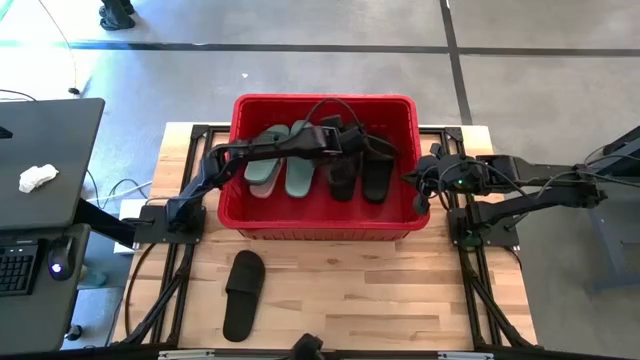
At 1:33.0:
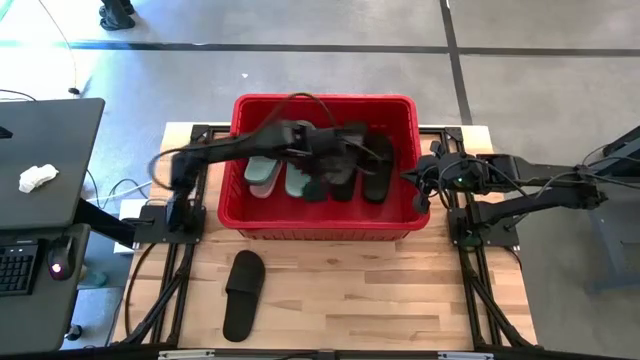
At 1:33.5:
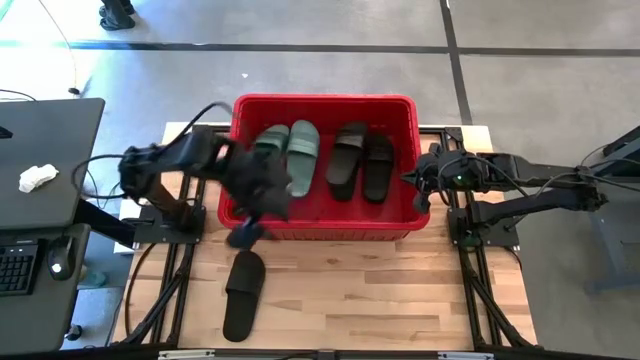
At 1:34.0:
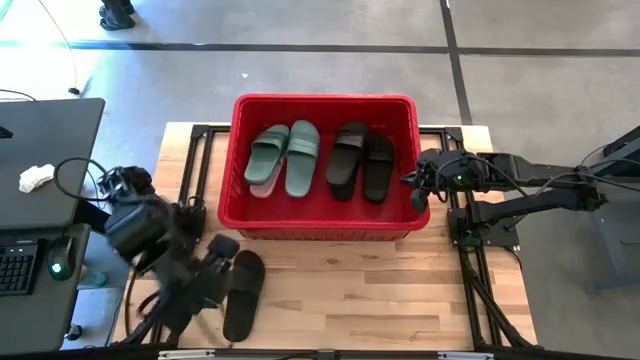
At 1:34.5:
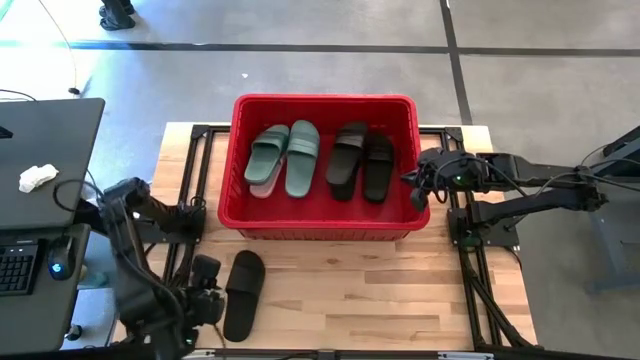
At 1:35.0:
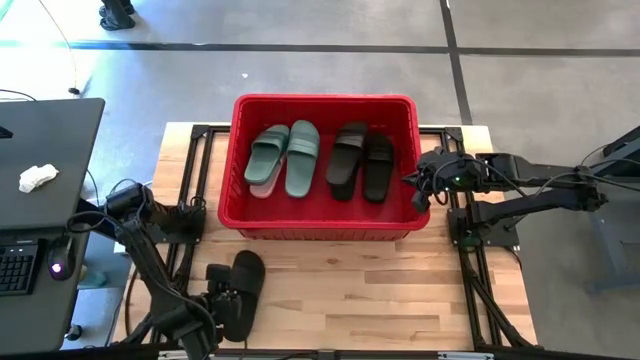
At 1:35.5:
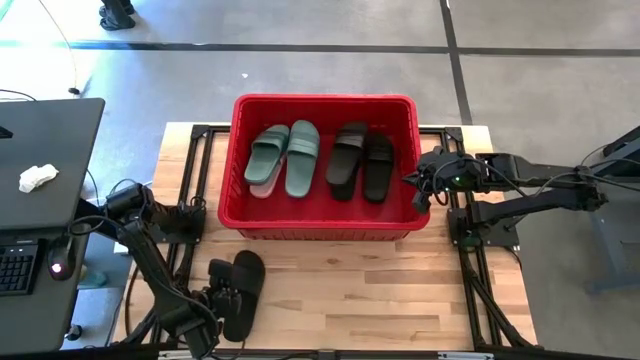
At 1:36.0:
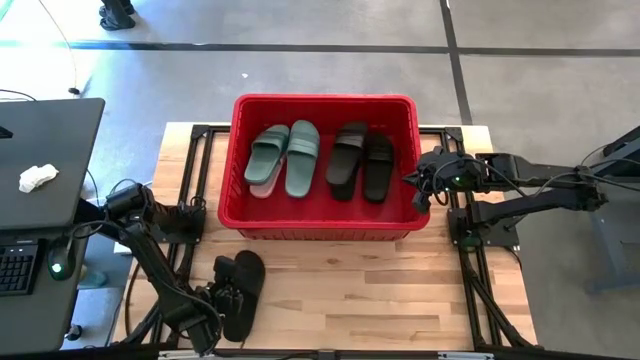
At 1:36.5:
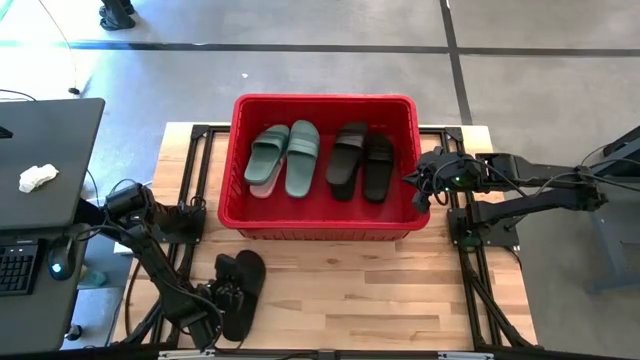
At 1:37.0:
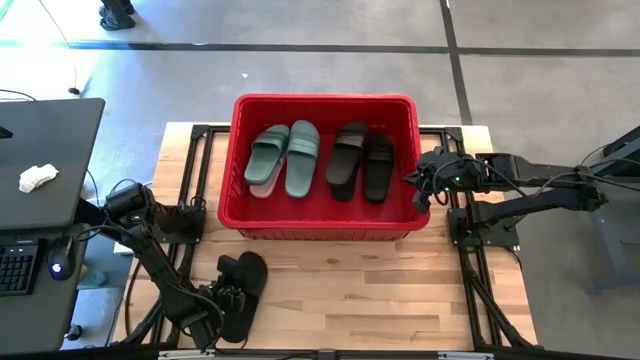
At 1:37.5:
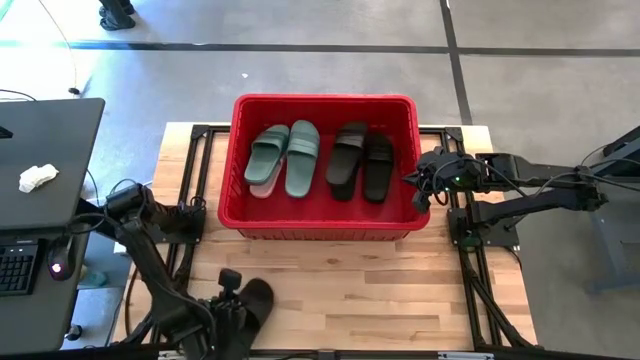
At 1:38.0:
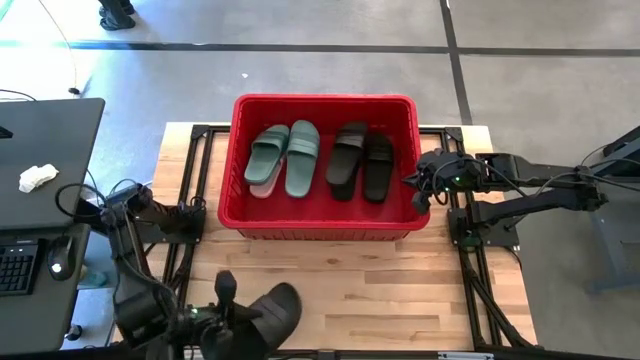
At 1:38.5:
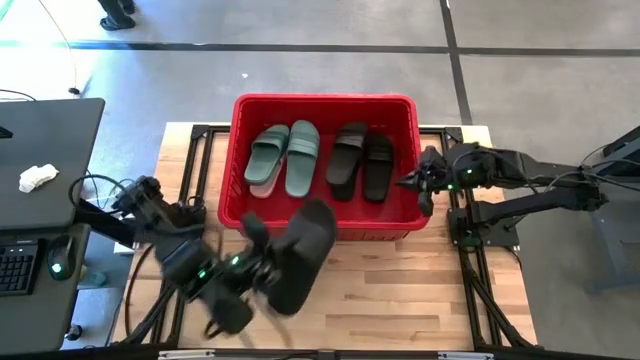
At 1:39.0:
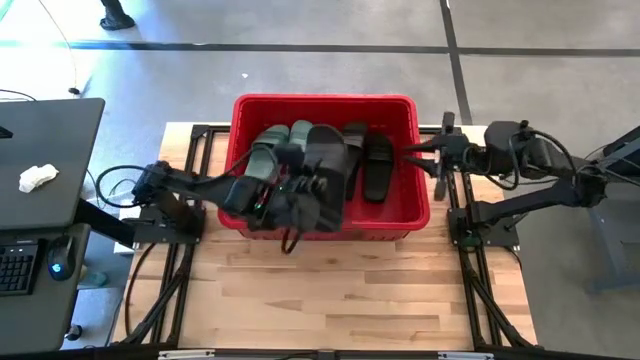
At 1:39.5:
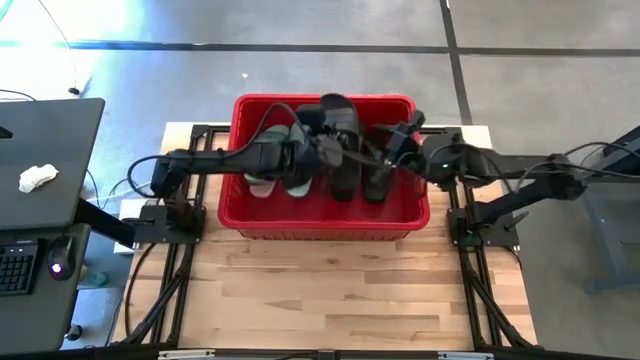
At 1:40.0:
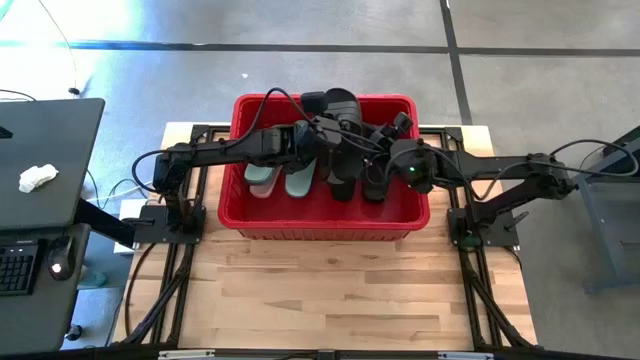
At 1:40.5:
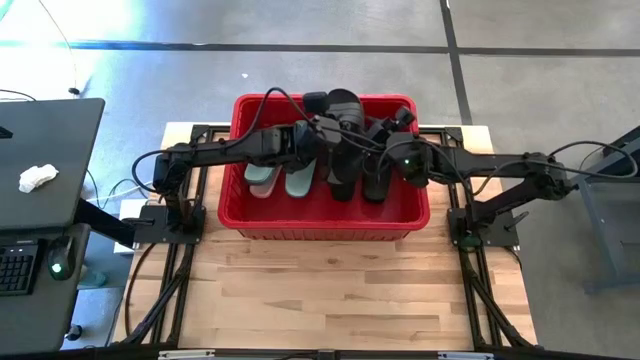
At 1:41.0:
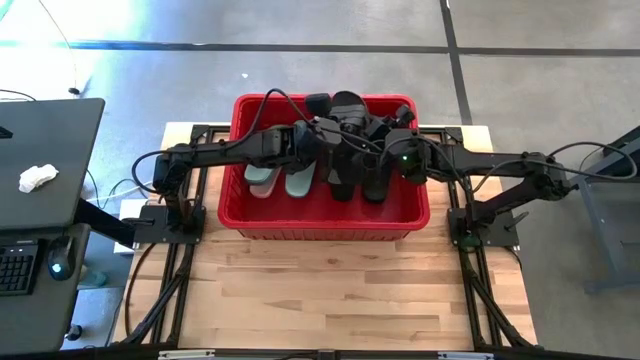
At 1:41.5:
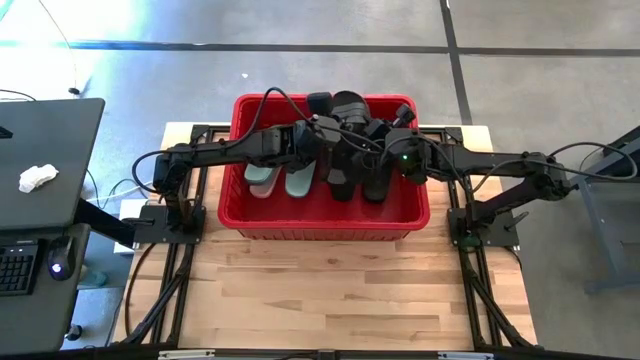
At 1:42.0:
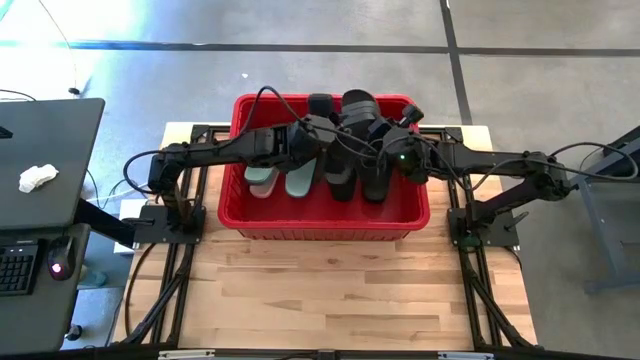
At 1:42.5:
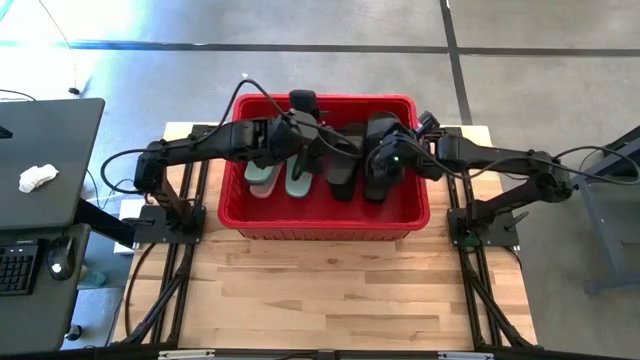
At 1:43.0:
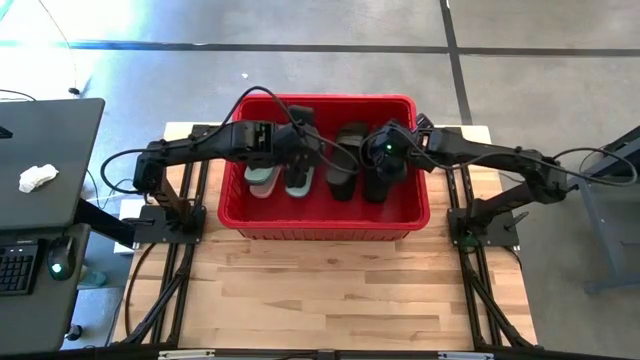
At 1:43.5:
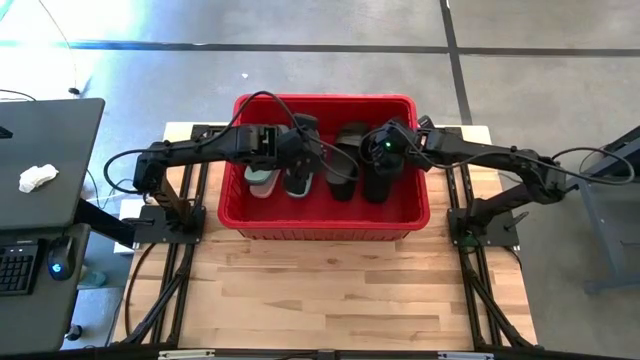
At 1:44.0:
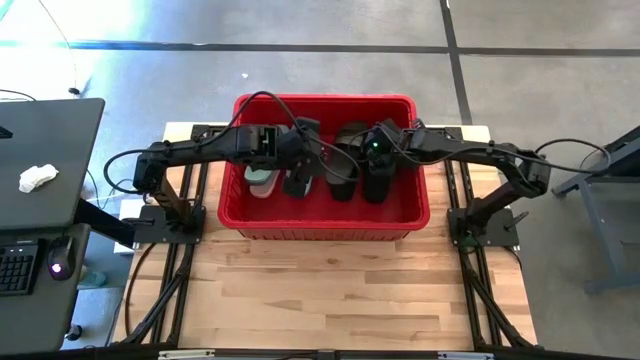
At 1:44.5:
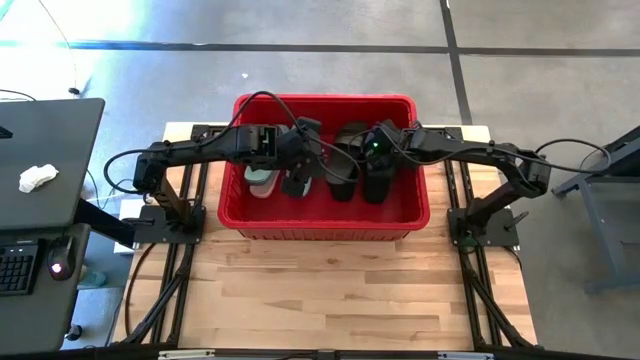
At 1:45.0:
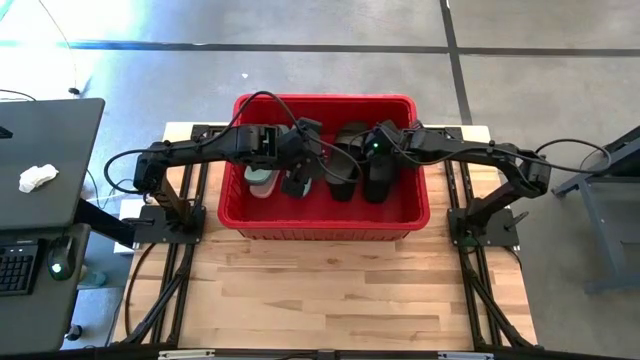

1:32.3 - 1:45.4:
Task: Pick and place slides into bin
Put the black slide into the red bin

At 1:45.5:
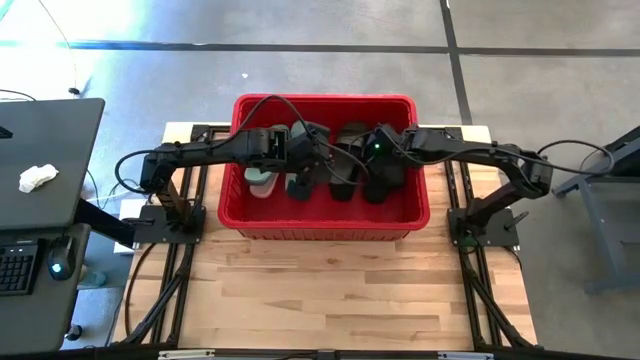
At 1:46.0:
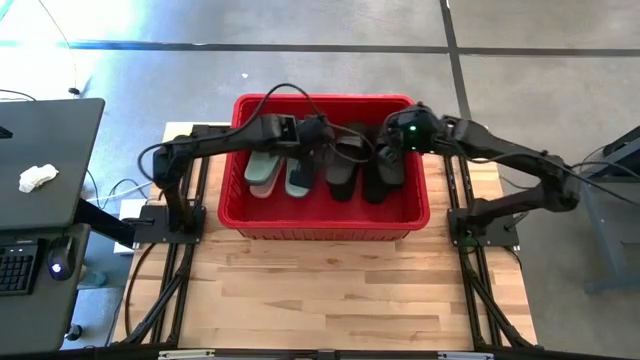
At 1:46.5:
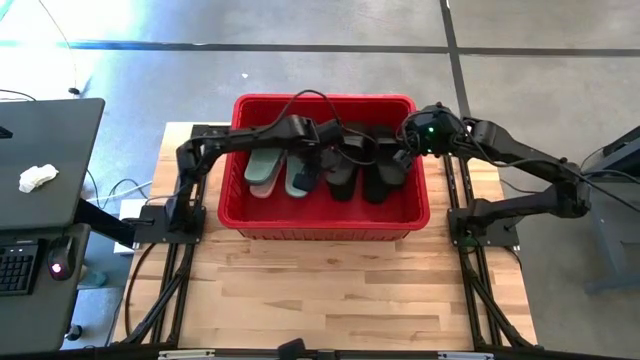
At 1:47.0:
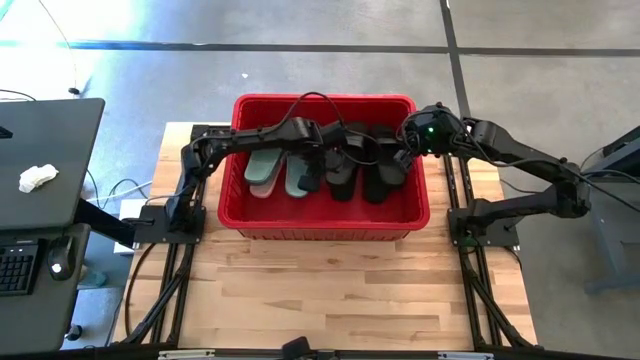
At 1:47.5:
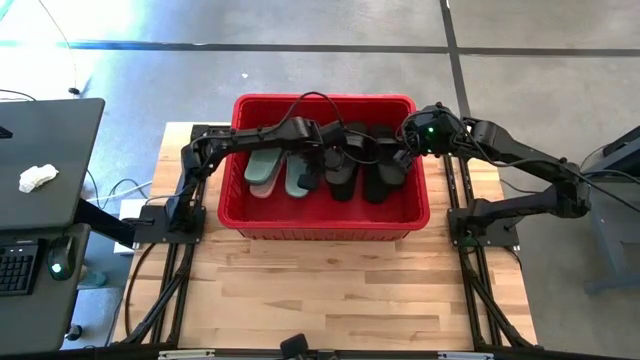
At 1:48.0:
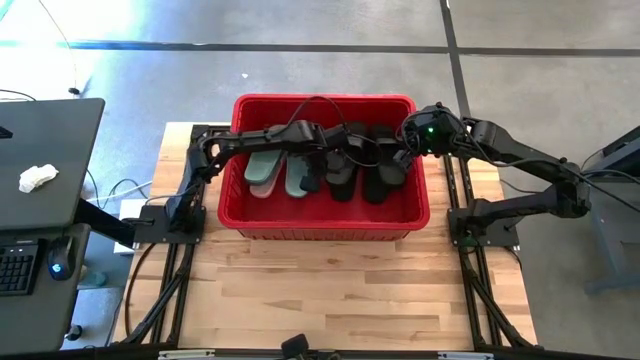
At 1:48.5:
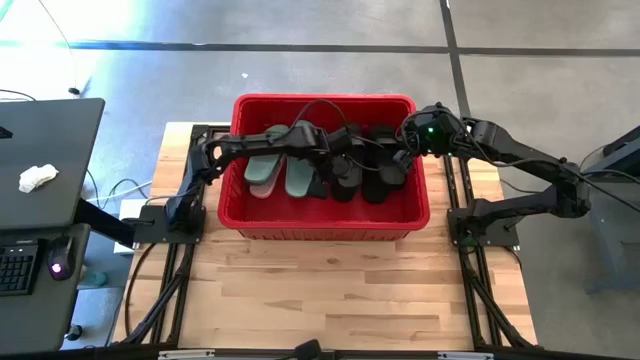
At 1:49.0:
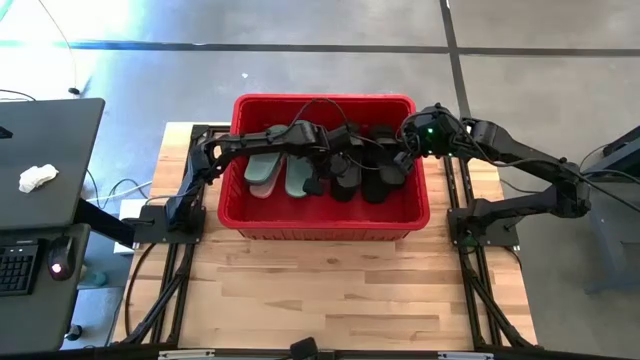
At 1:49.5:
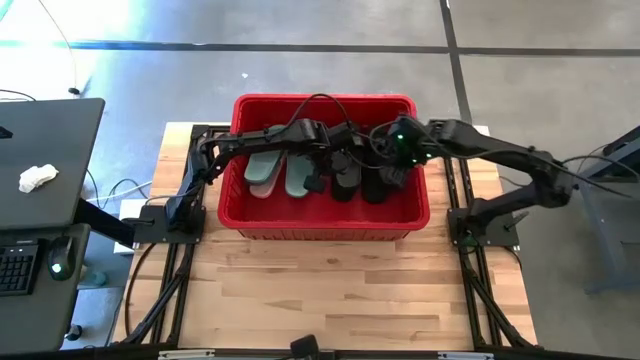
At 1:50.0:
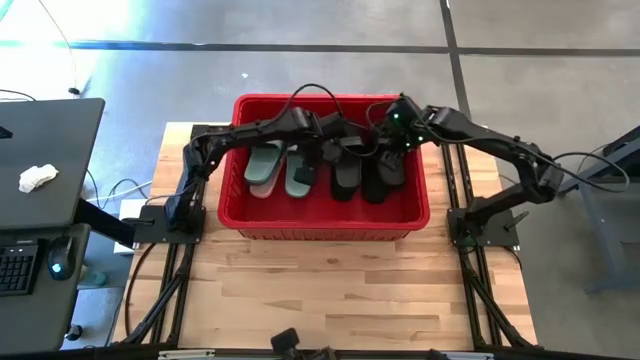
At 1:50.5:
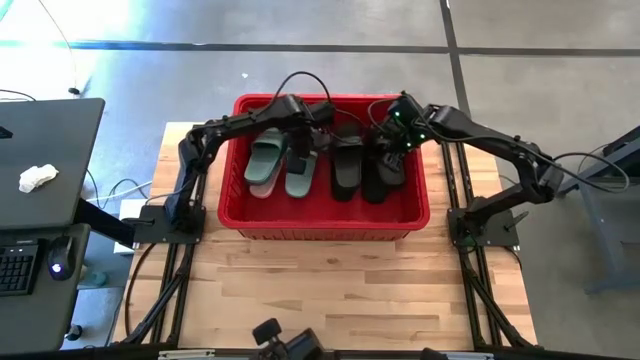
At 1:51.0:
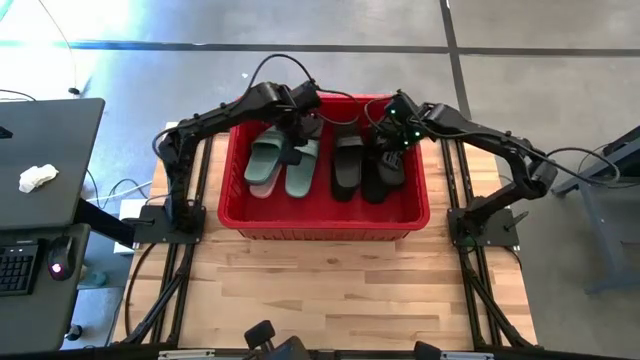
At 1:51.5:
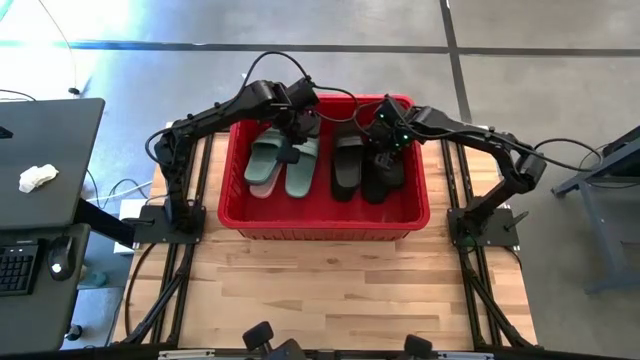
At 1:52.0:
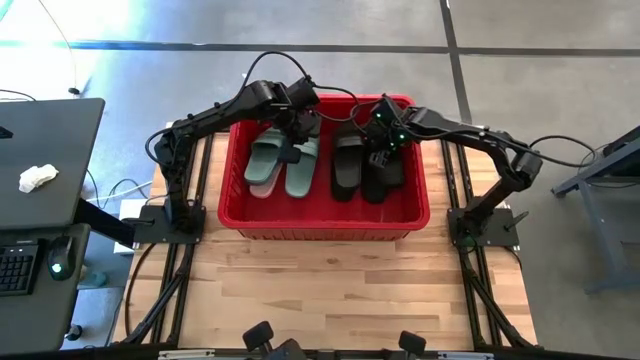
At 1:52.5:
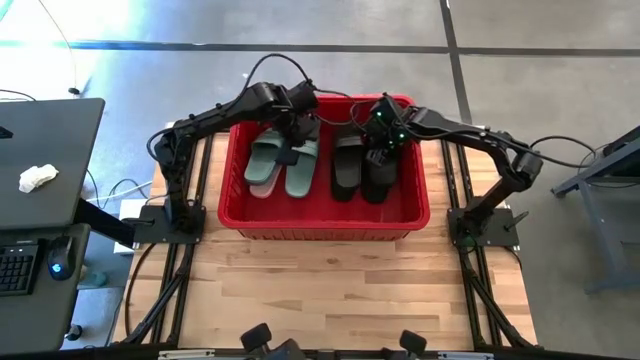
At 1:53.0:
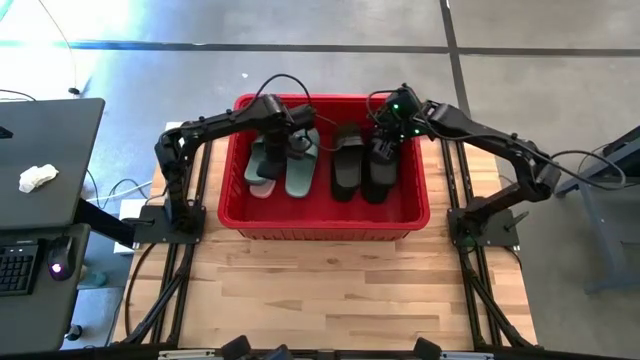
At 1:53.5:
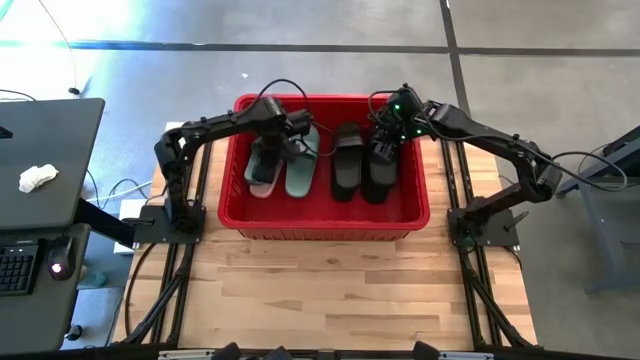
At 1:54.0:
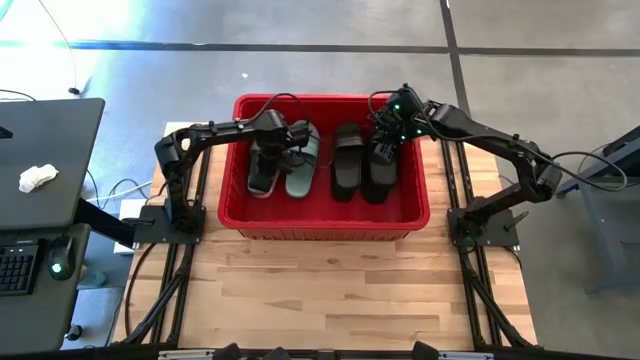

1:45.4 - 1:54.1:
Adjust the slides on the red bin

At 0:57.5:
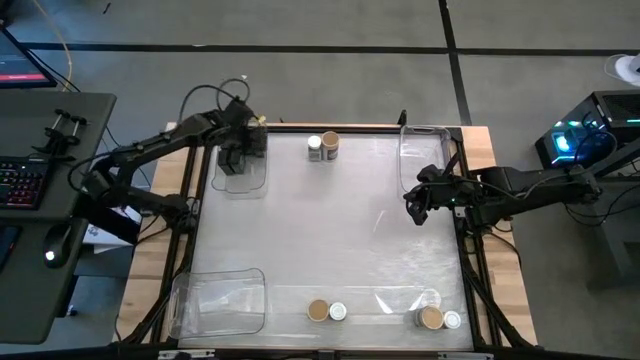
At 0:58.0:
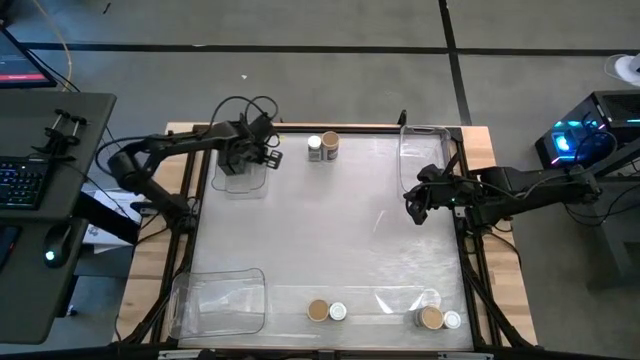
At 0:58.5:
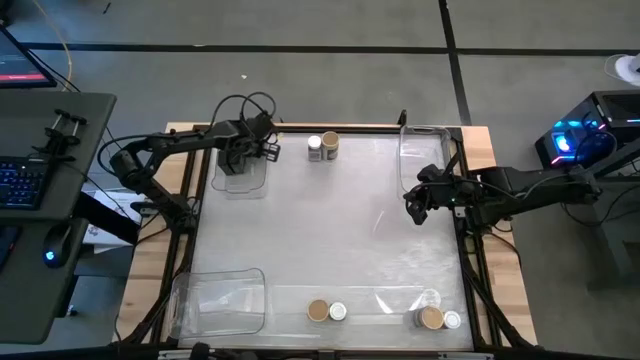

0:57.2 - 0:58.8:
Task: Sort spices by type
Adjust the black seasoning can
